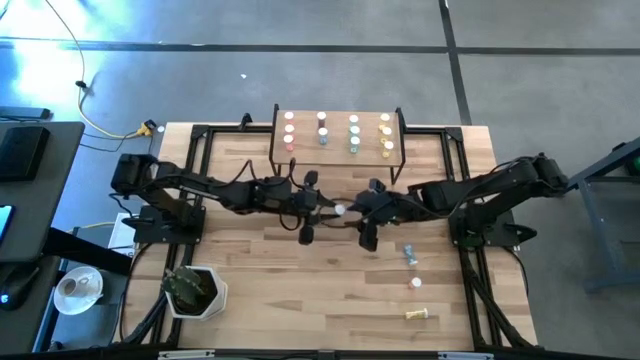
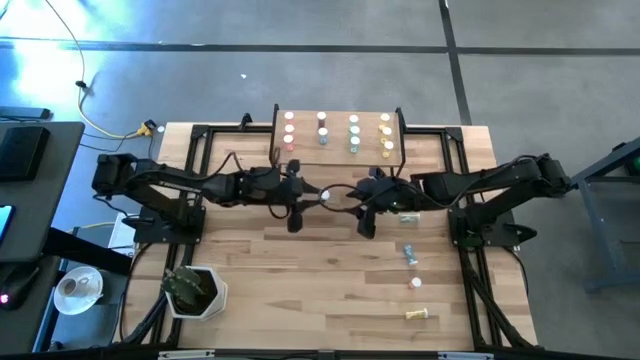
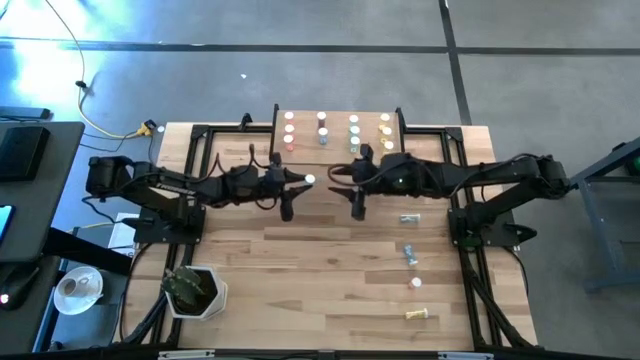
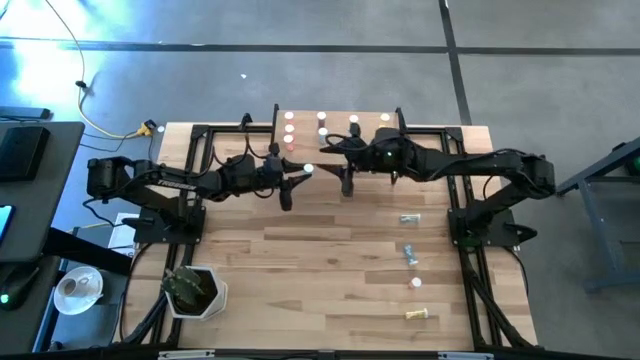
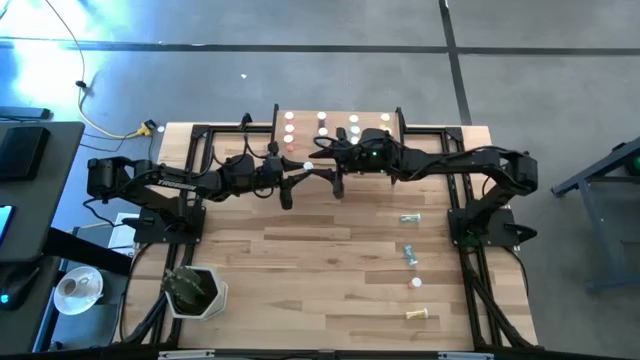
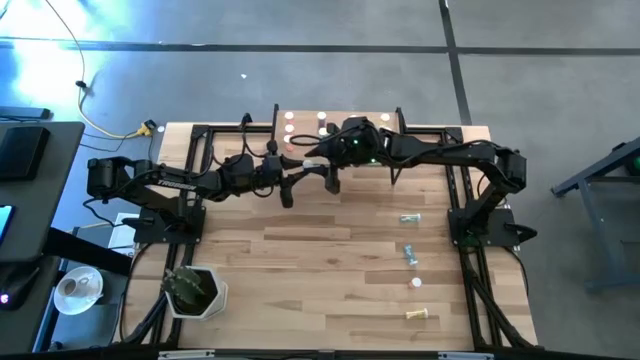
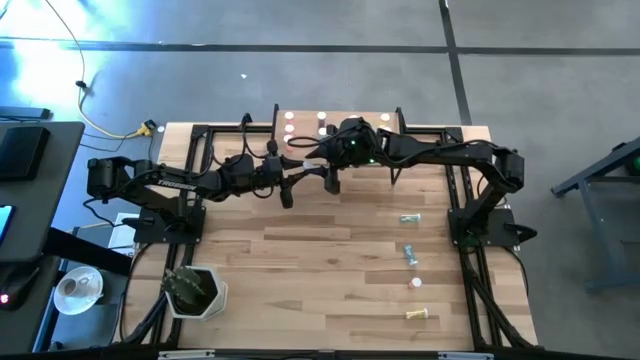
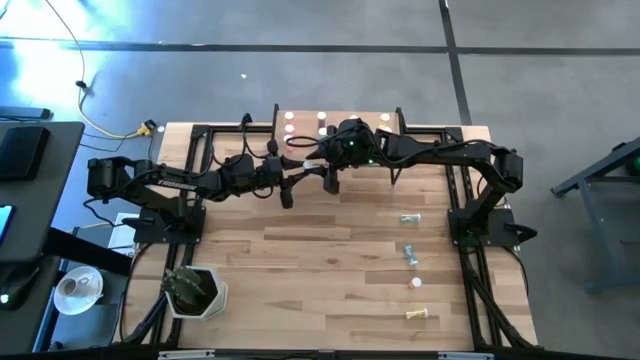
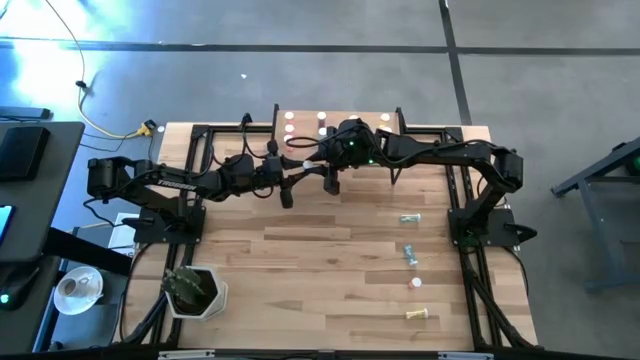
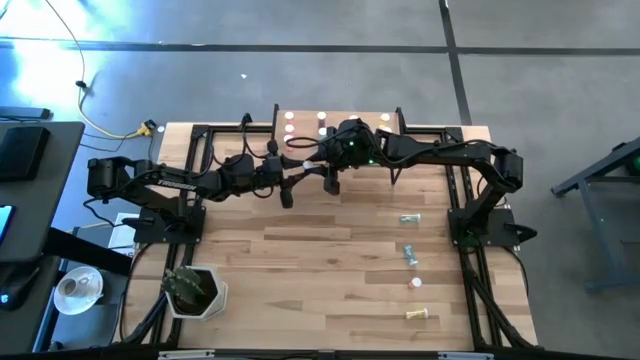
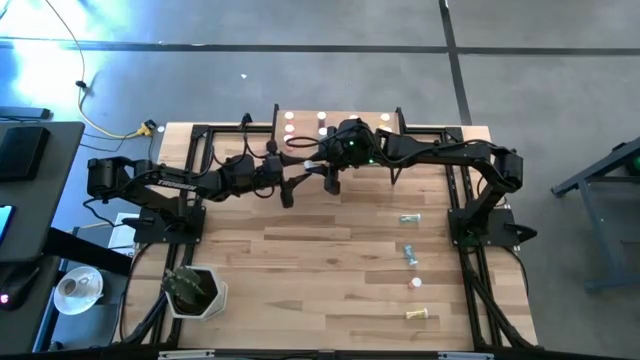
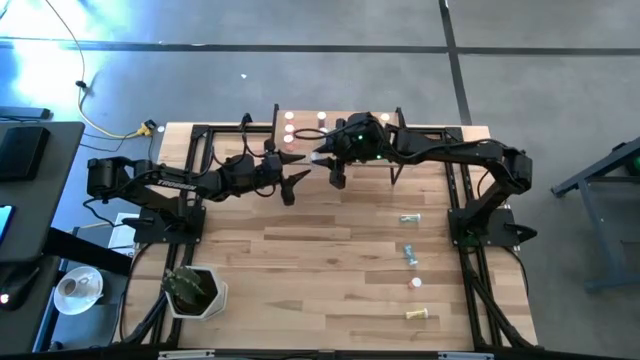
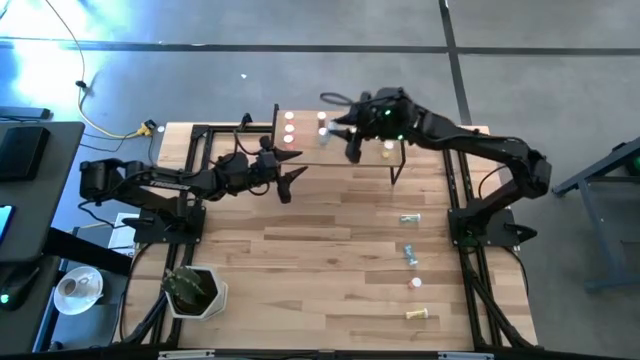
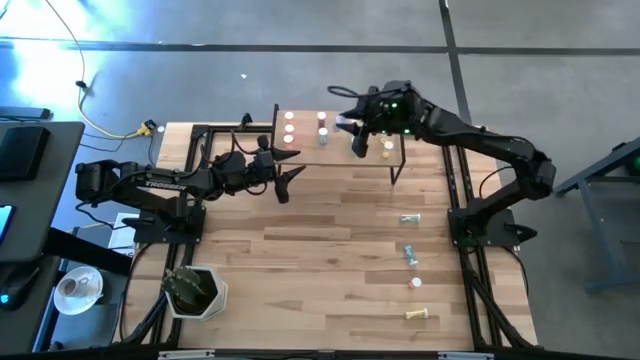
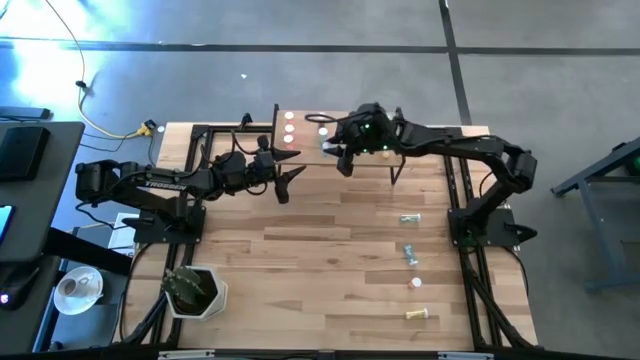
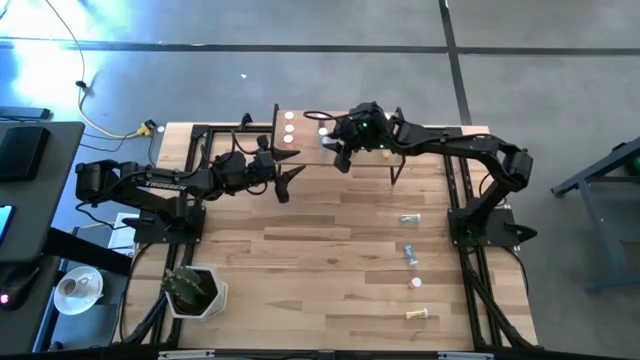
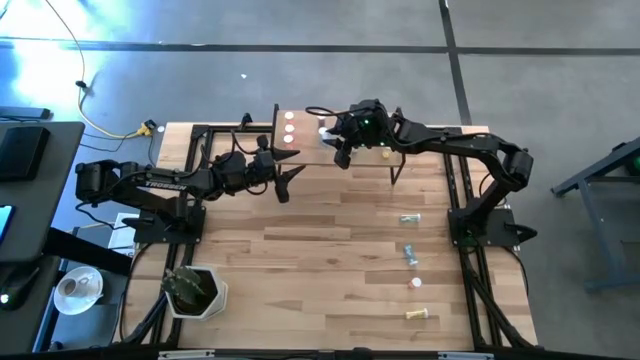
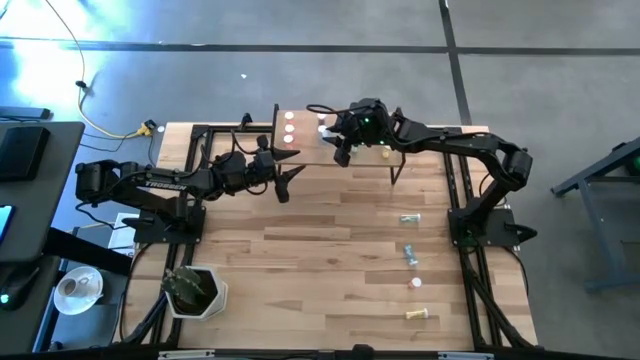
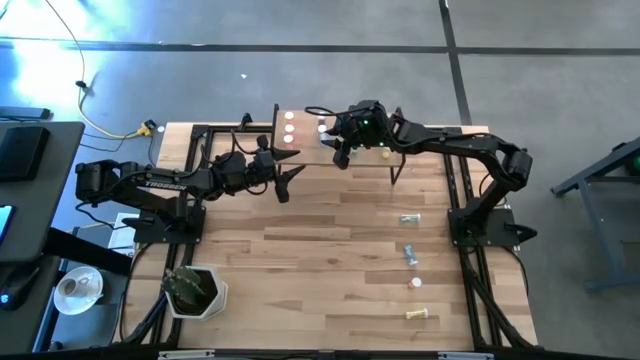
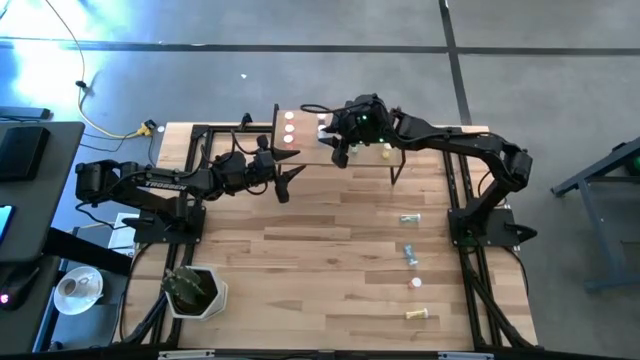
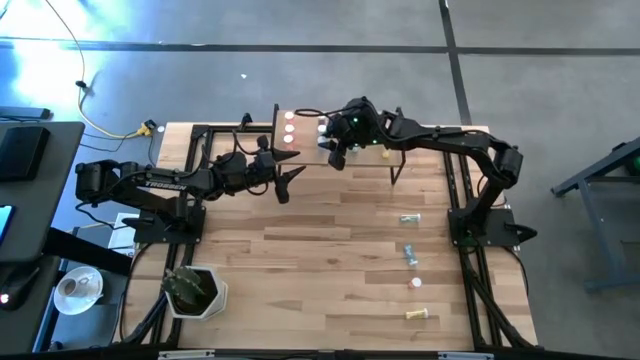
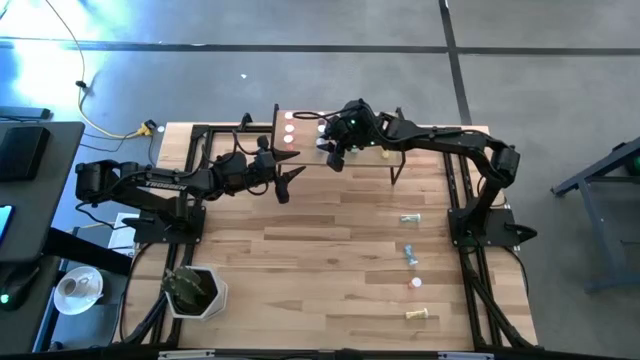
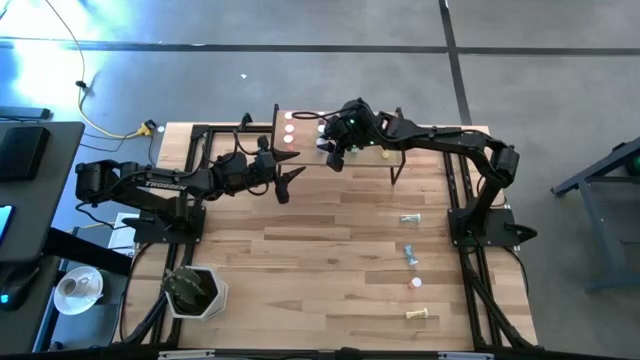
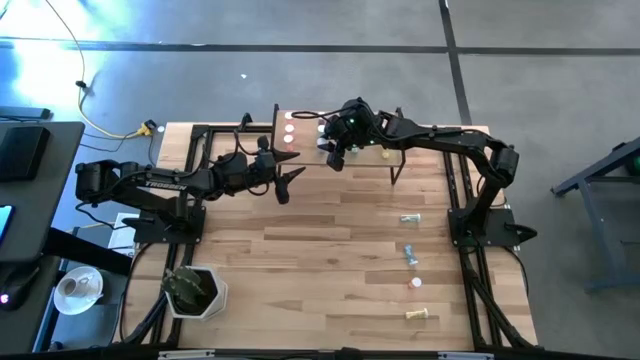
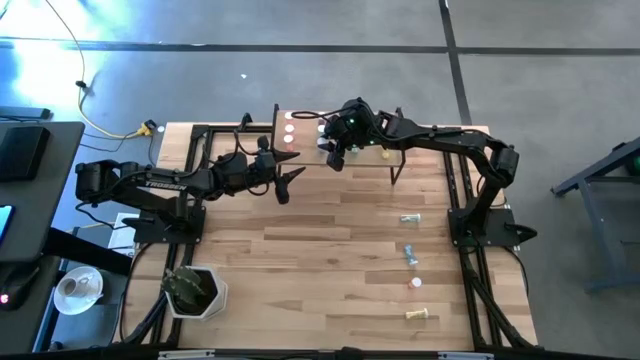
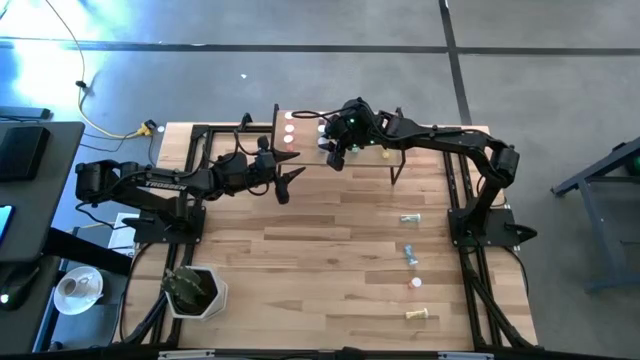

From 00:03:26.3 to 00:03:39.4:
Task: Pick and place medicine bottles onto shelf by color
Put the blue pill bottle on the shelf aligned with the other blue pill bottles

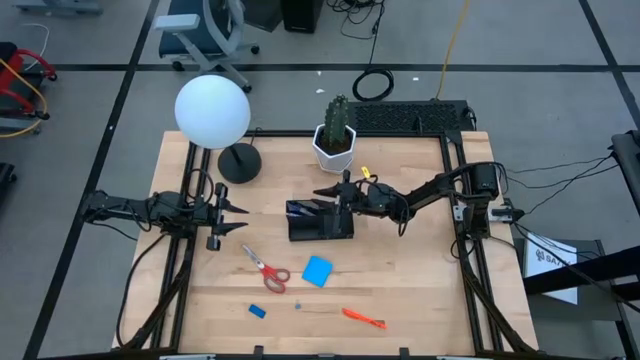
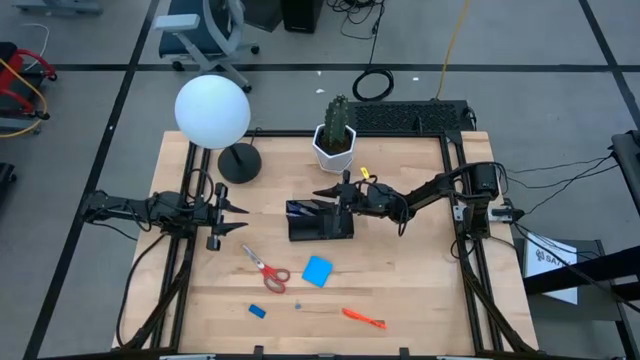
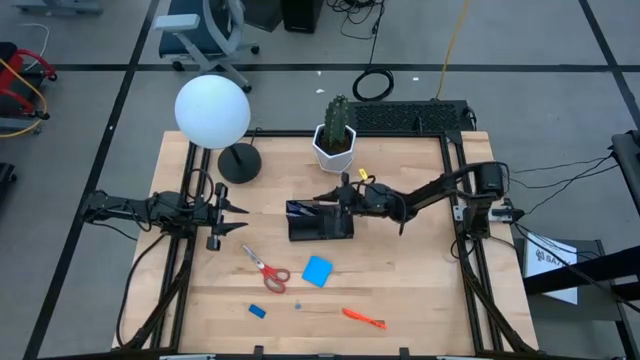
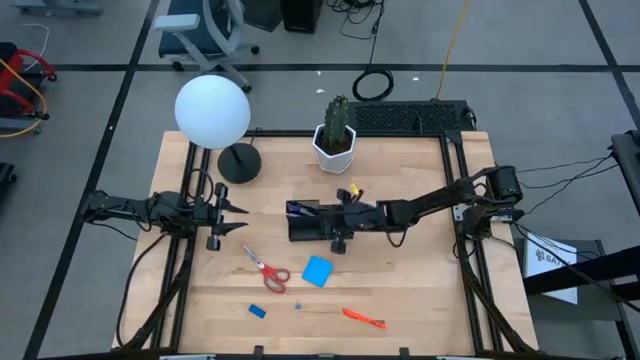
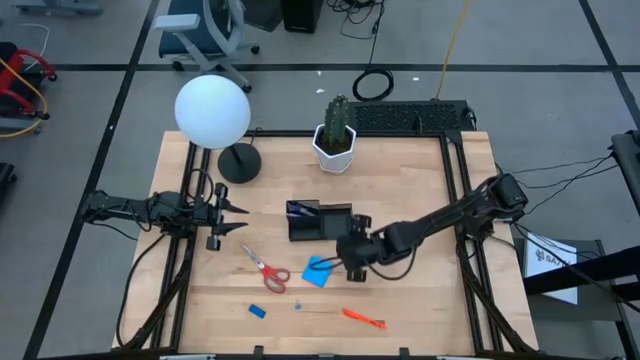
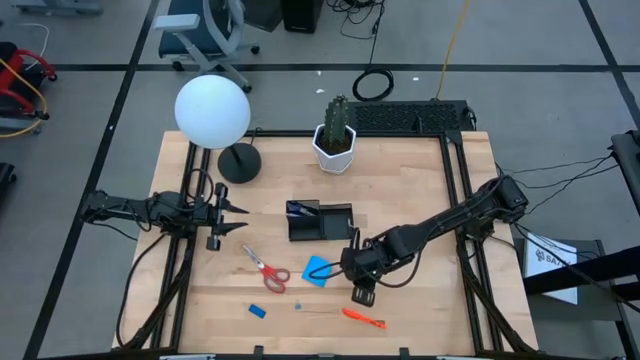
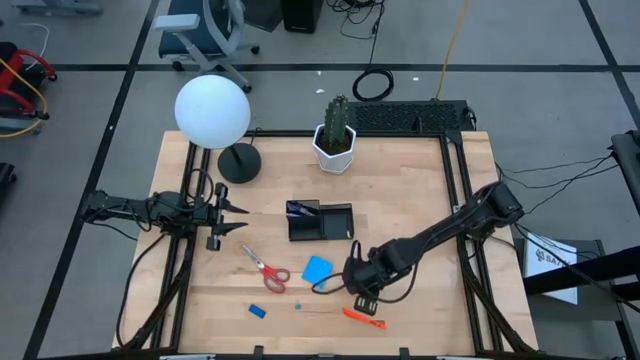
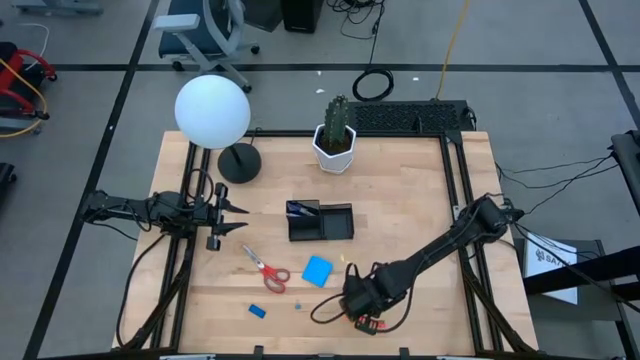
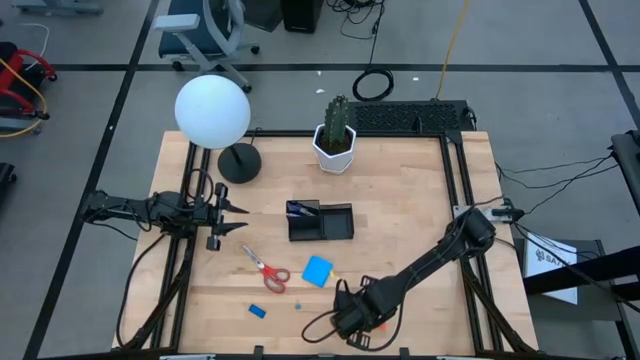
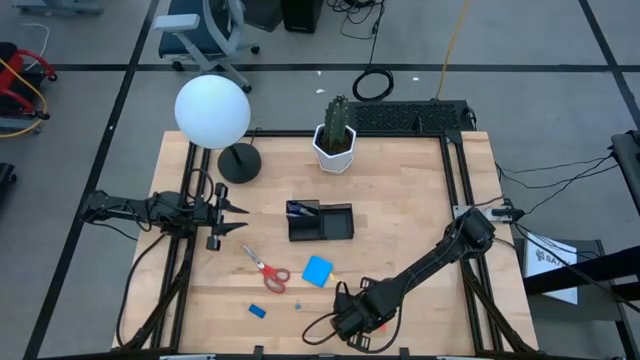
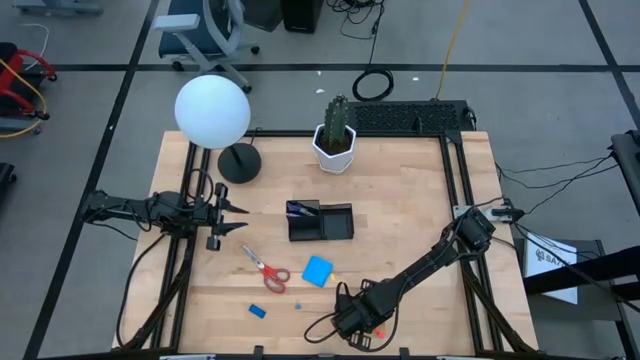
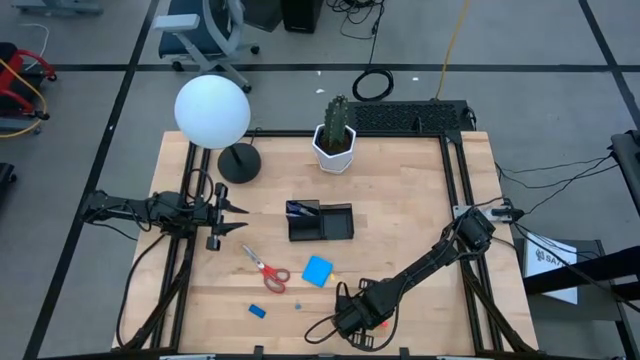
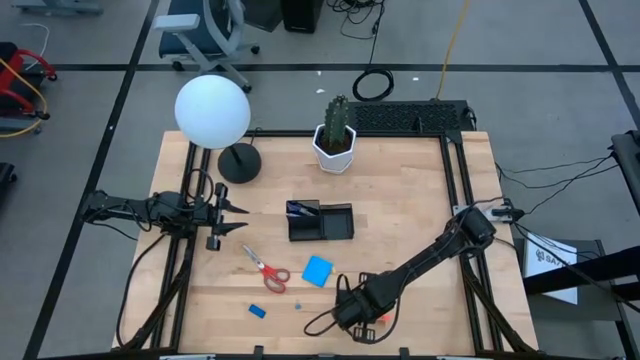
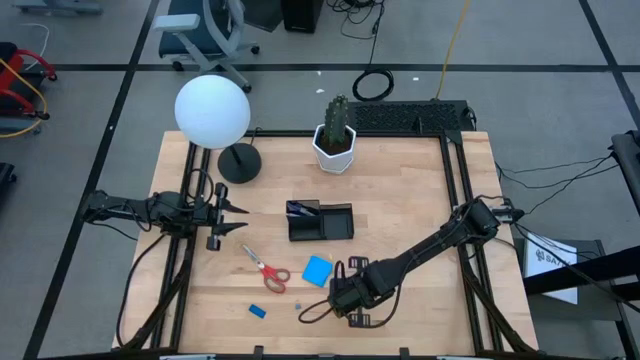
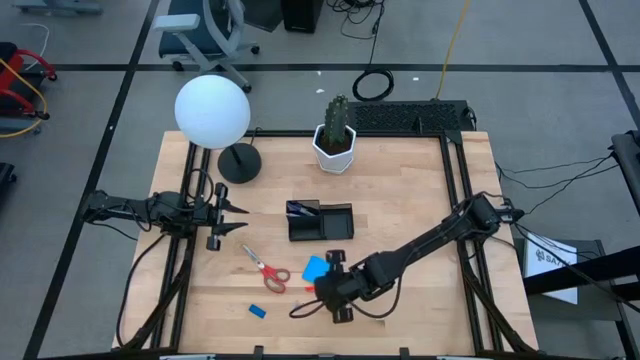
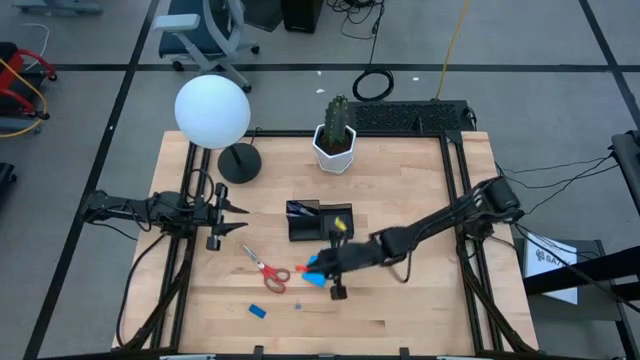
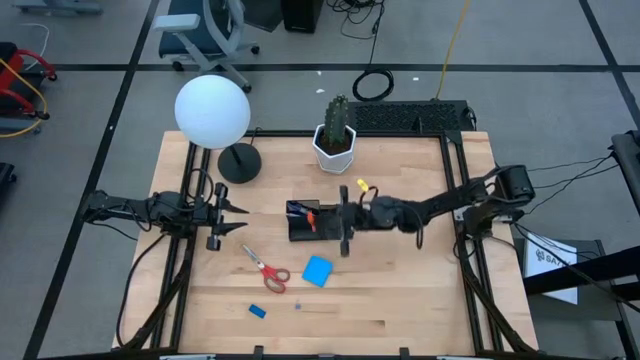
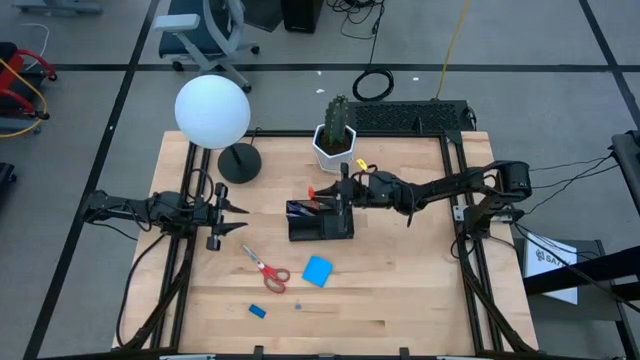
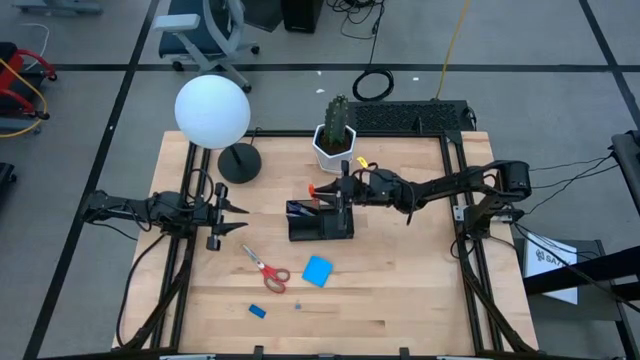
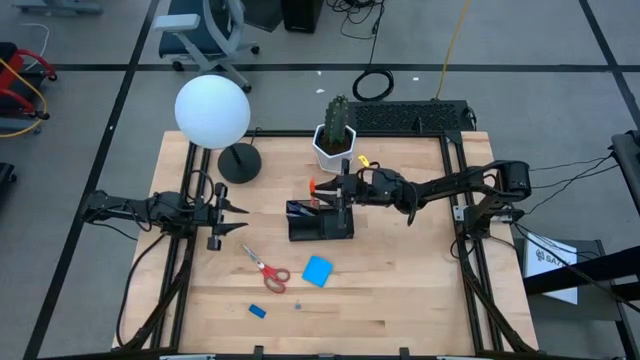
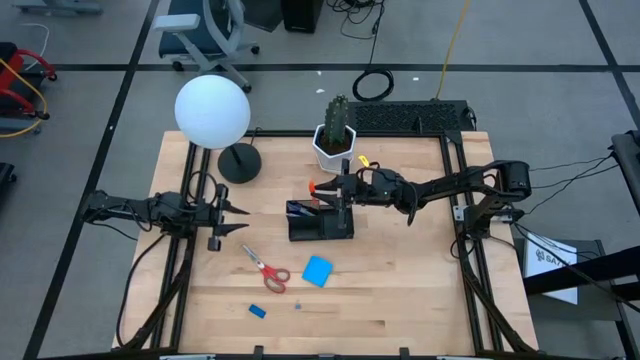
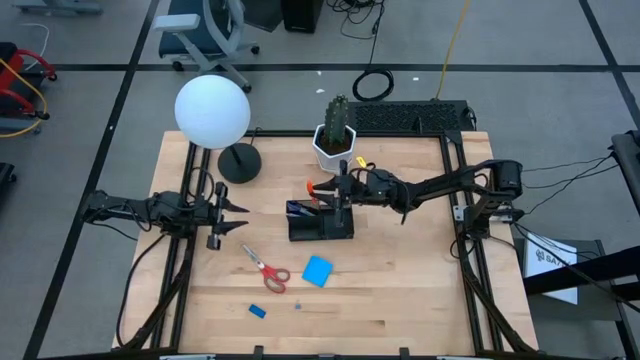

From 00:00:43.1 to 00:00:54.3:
Task: Pick and place office supplies into organizer
Put the orange pen into the black desk organizer
